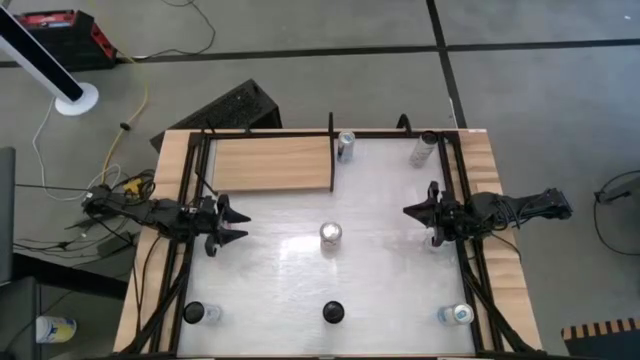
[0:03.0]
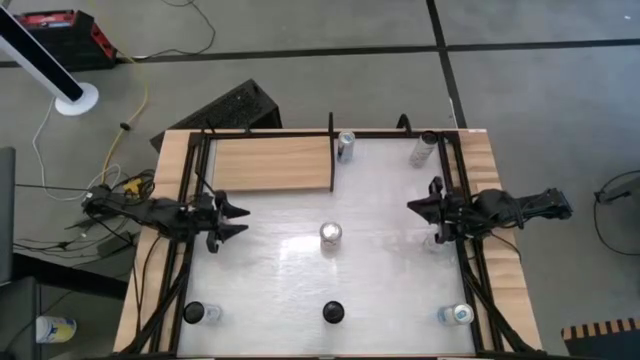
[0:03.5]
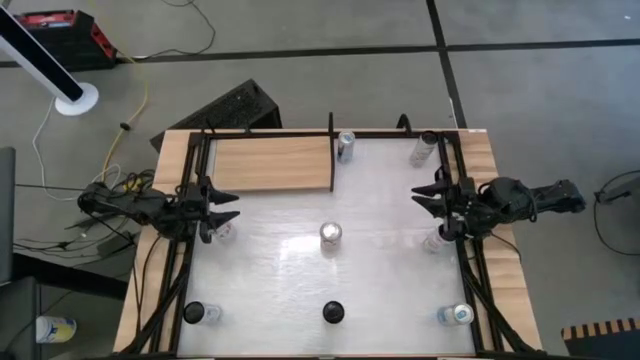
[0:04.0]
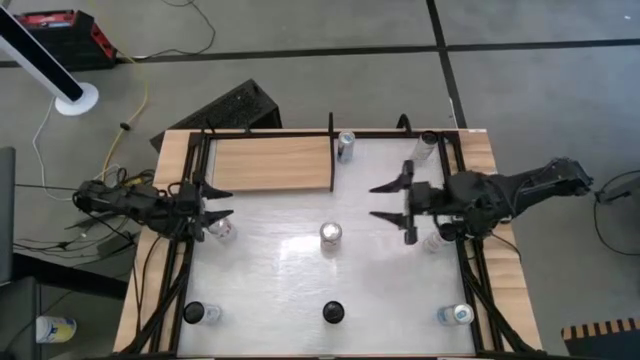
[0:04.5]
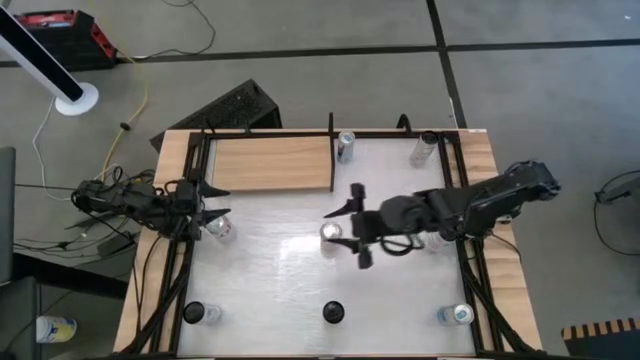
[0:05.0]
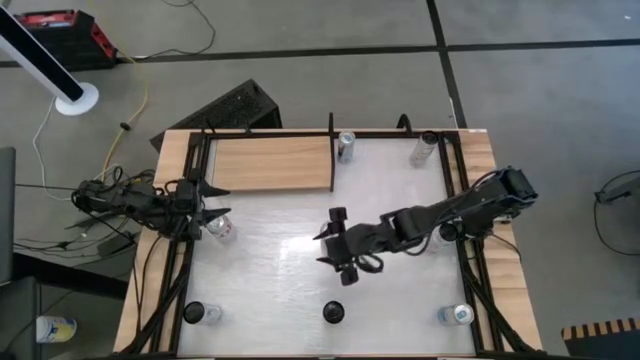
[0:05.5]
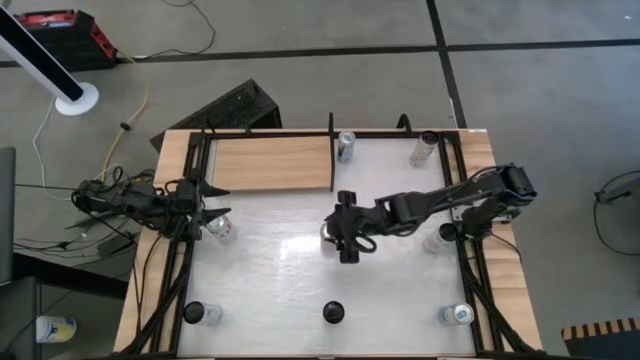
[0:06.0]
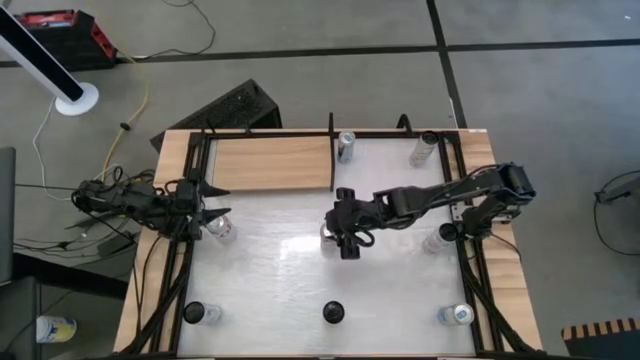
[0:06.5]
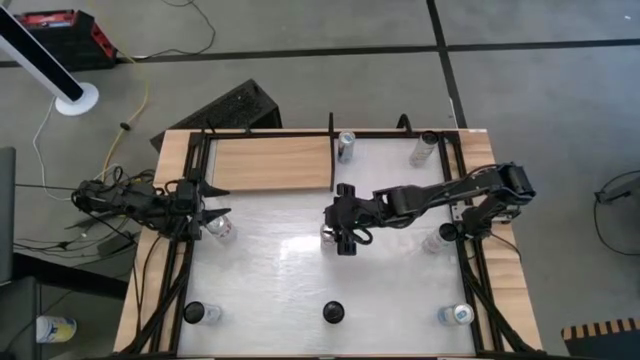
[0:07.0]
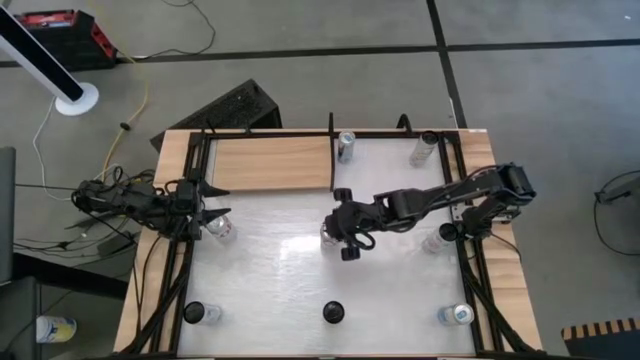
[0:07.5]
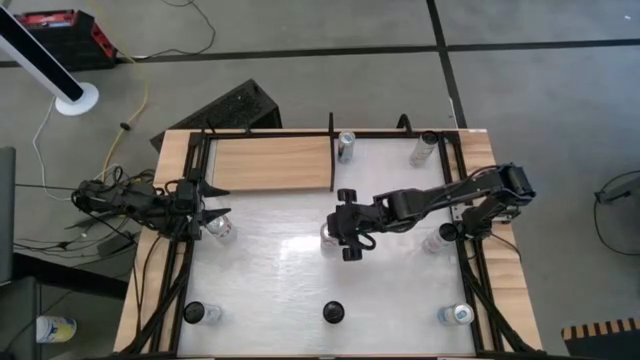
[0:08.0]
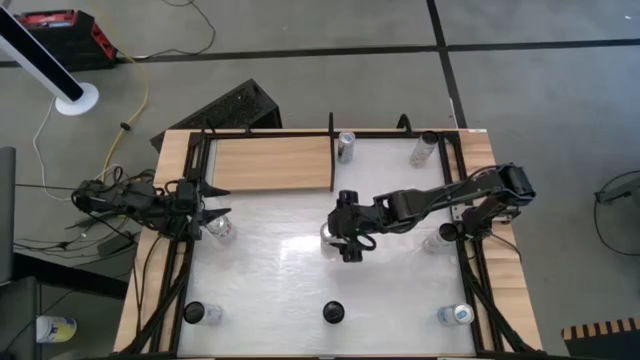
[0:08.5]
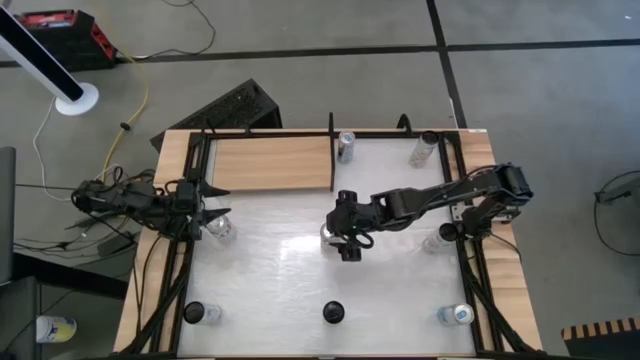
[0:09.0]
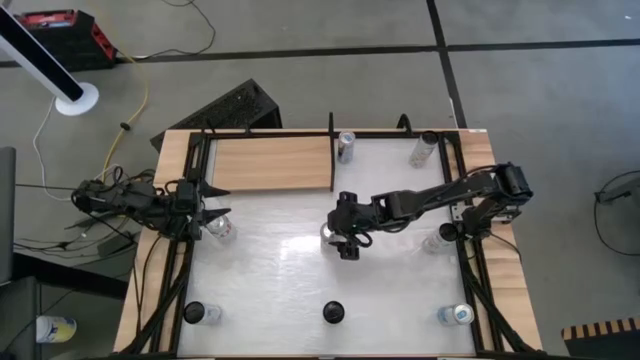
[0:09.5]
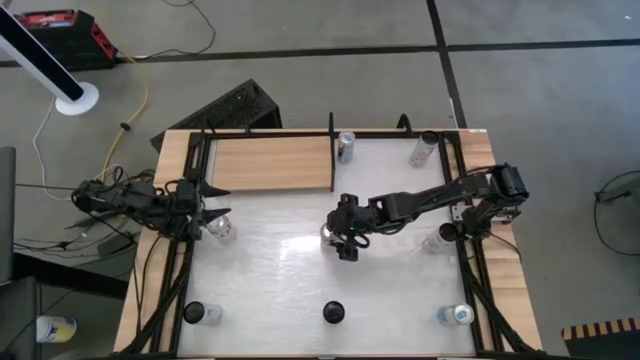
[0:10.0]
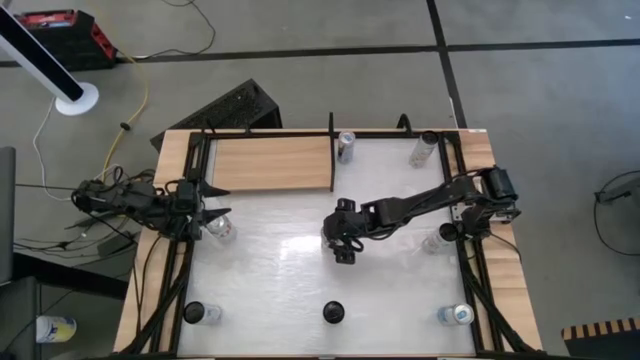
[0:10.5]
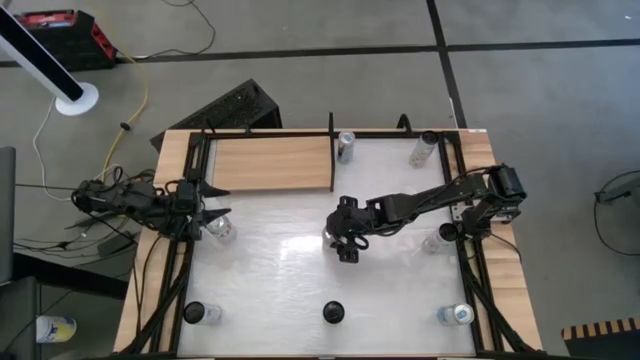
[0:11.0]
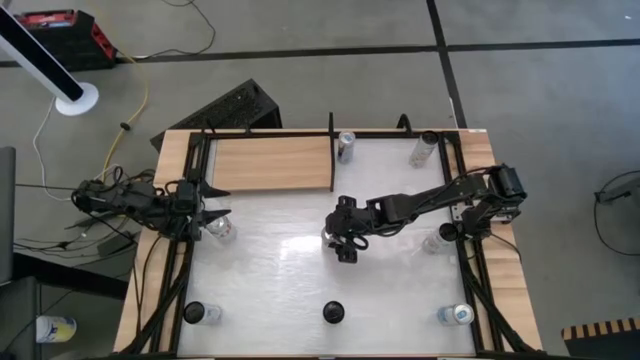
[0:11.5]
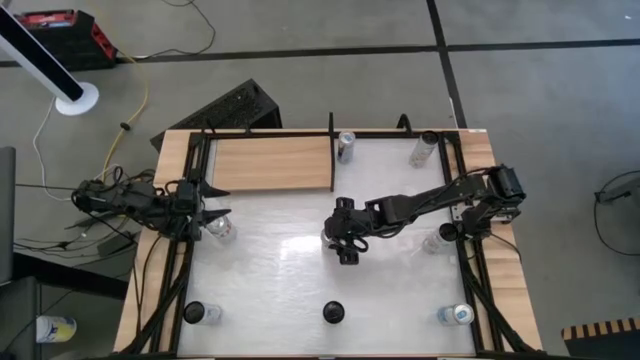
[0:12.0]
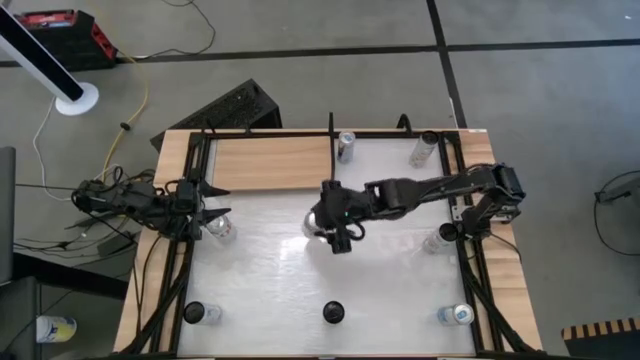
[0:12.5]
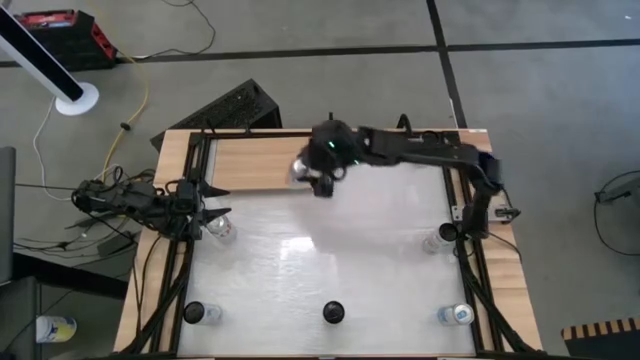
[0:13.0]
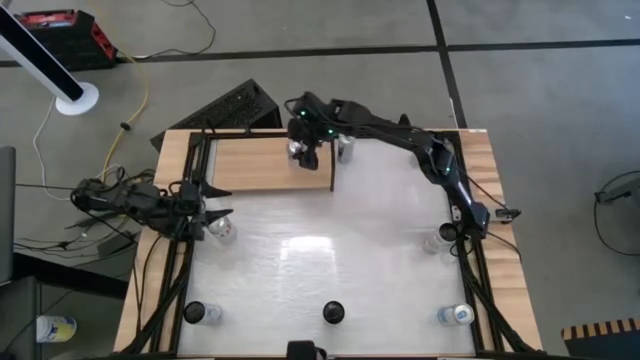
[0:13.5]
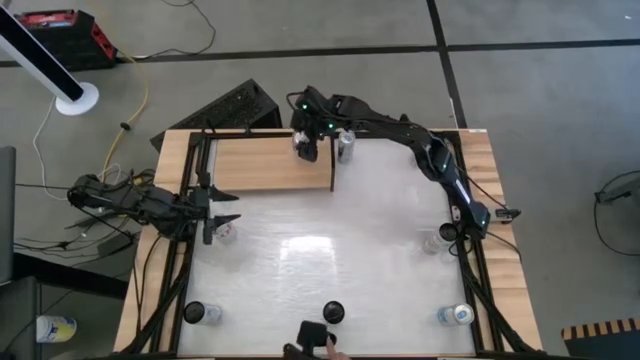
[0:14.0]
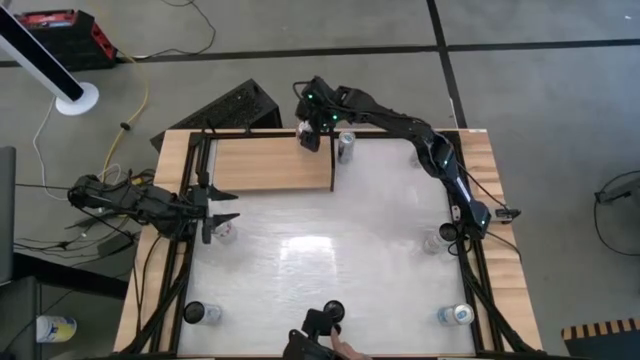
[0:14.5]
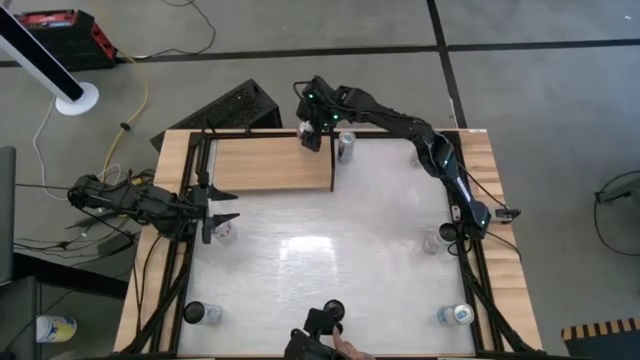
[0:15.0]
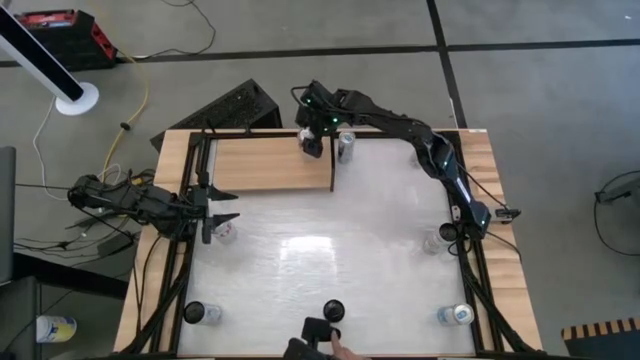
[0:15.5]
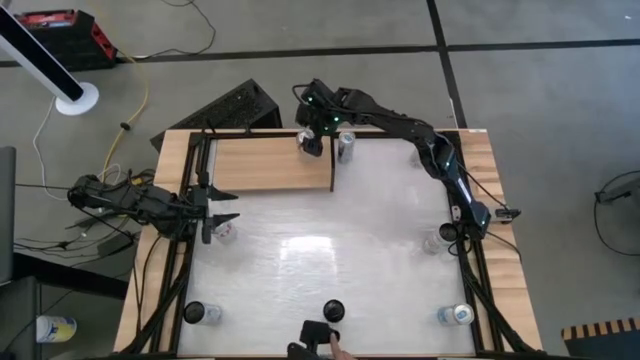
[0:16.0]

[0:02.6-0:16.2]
Task: Place canned beverage on shelf
Put the right white soda can on the shelf

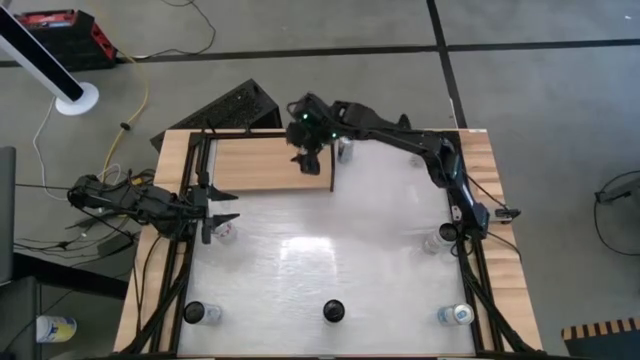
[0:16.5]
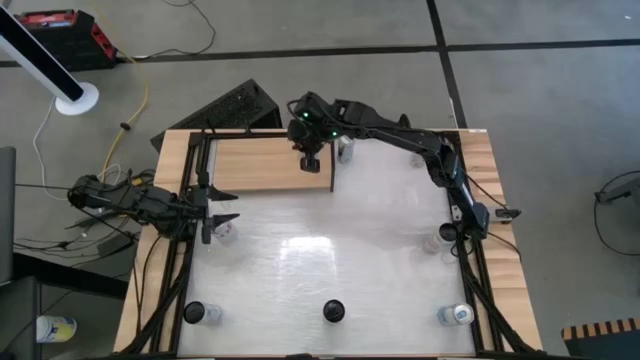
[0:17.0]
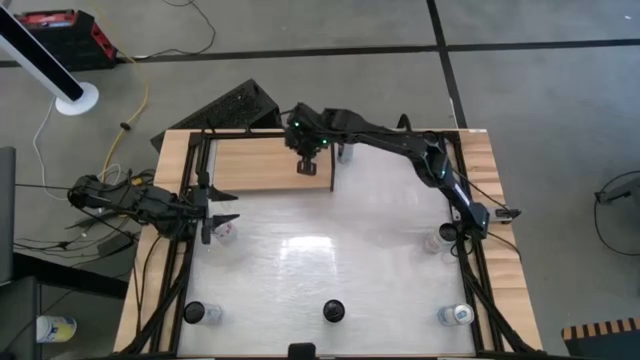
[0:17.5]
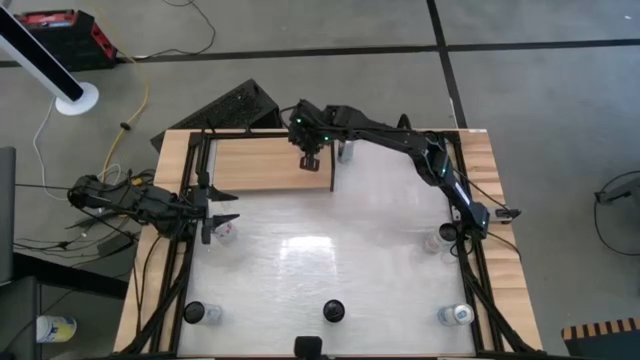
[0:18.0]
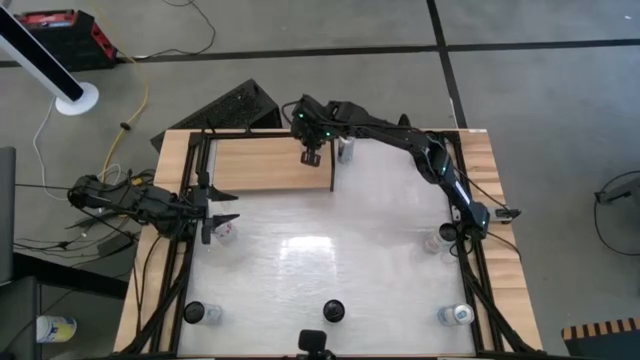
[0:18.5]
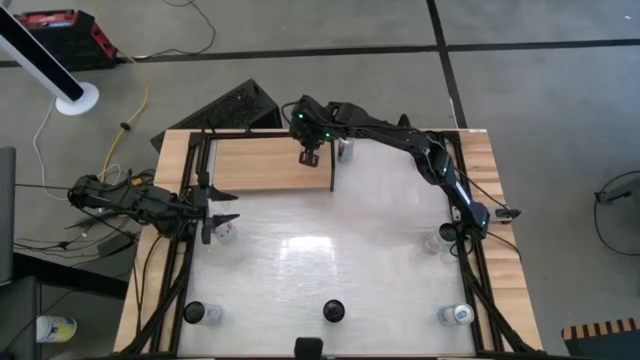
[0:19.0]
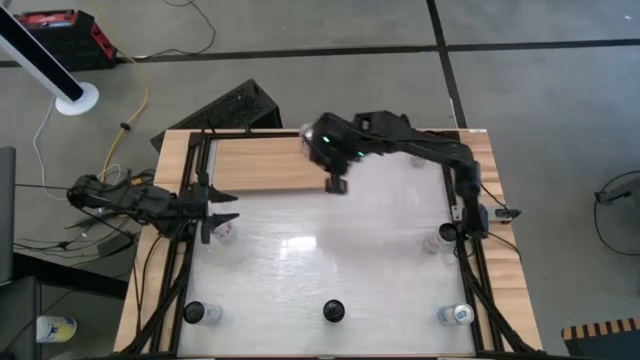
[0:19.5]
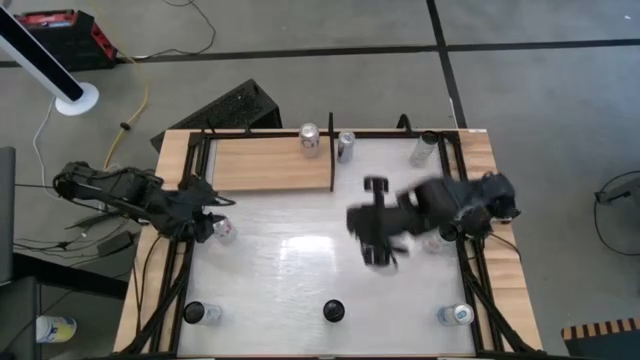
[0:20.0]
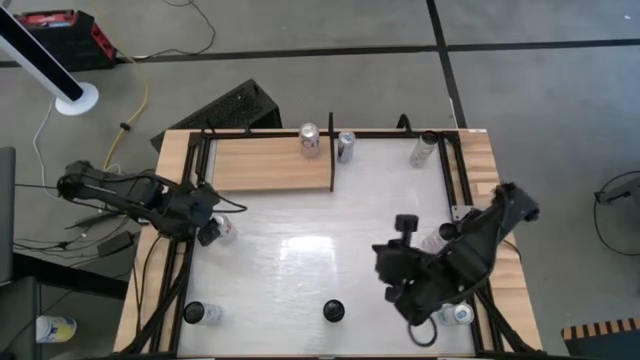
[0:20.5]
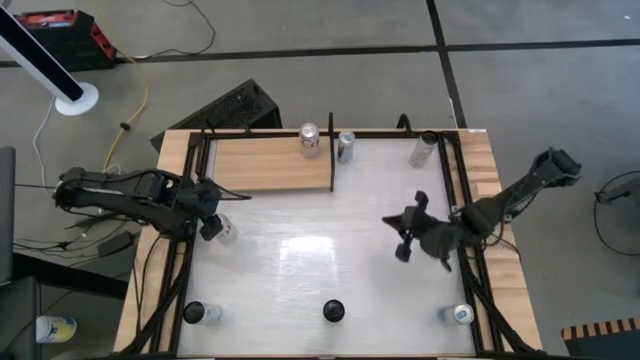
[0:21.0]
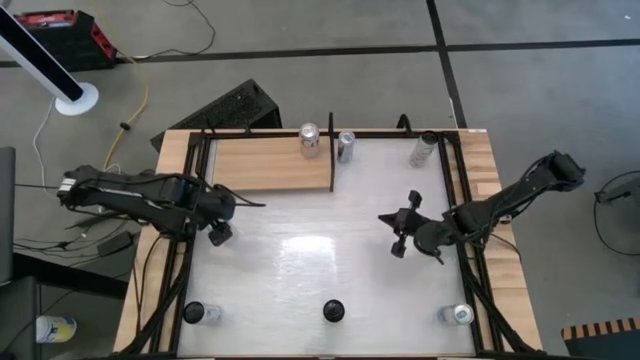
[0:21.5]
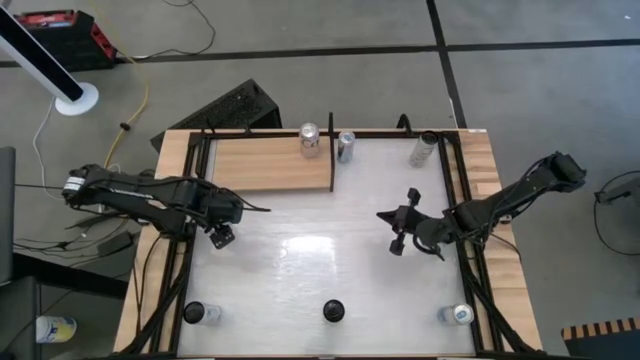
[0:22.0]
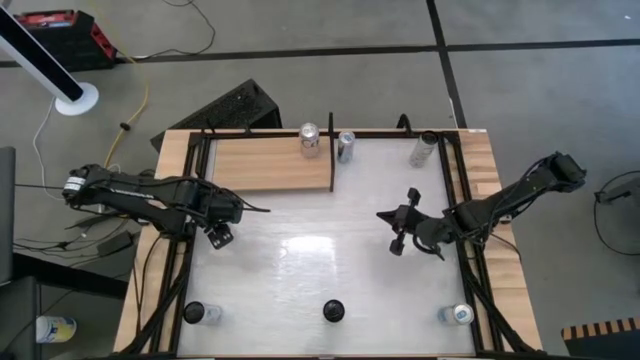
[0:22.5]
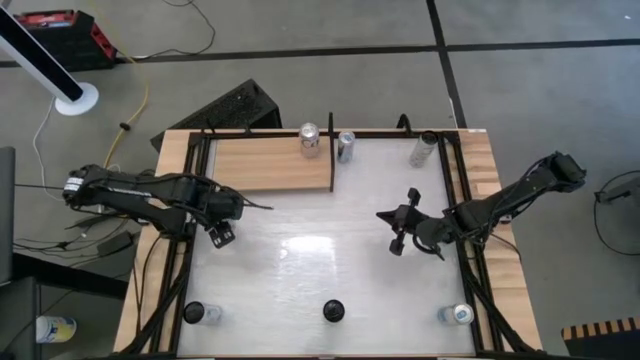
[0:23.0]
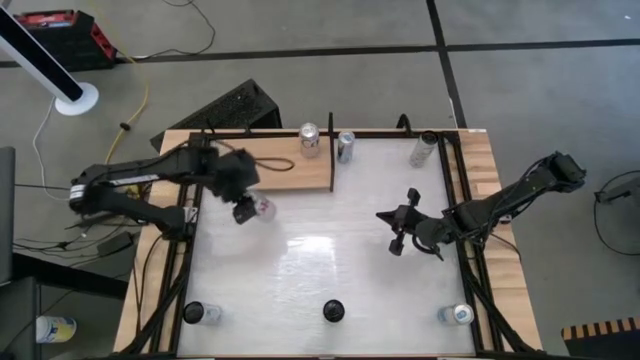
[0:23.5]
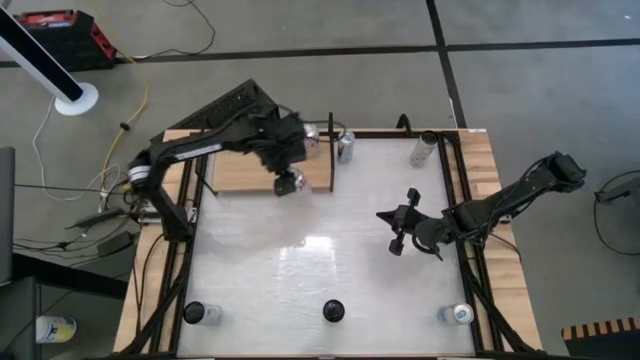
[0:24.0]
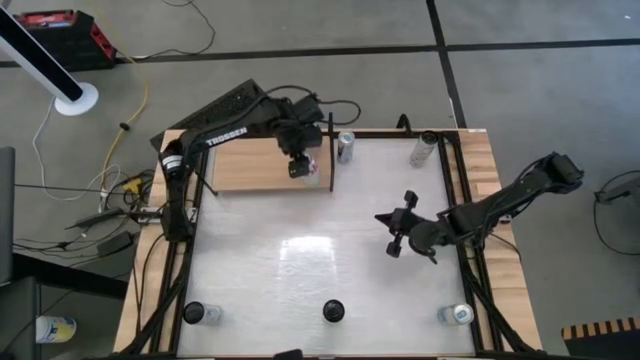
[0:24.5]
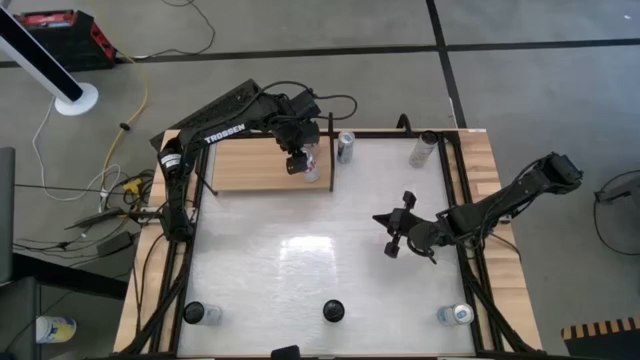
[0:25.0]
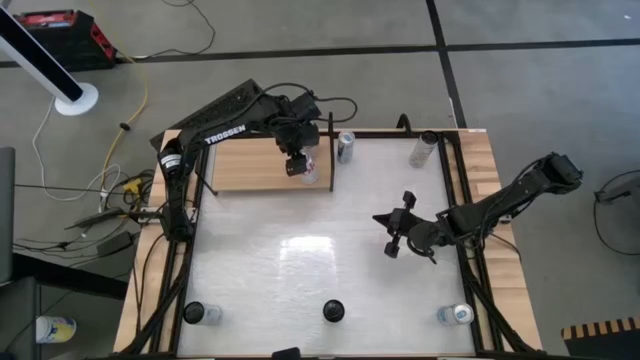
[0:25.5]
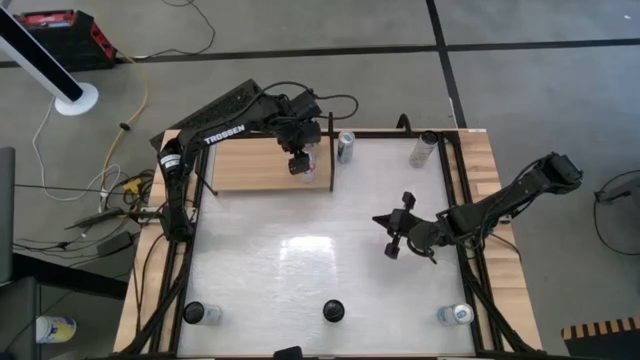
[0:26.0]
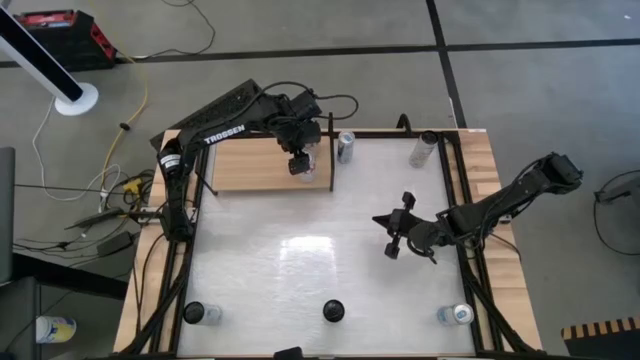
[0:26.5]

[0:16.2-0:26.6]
Put the left white soda can on the shelf
